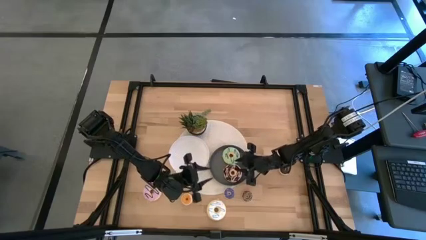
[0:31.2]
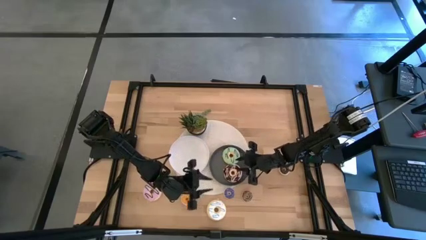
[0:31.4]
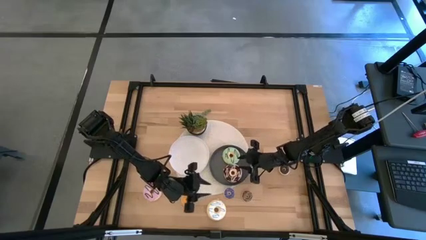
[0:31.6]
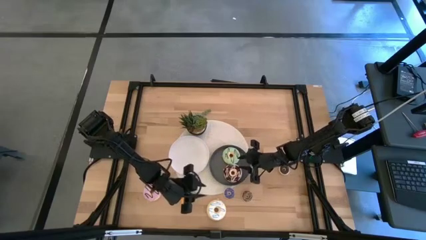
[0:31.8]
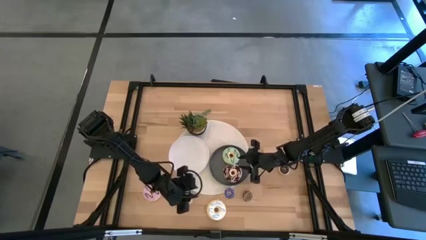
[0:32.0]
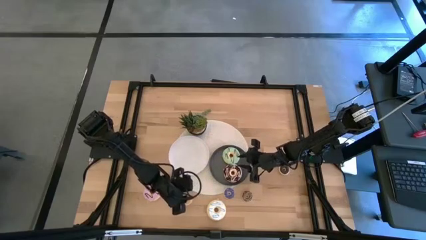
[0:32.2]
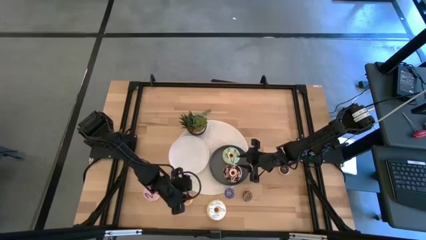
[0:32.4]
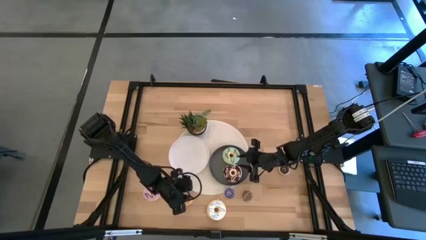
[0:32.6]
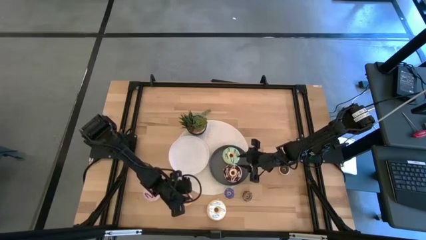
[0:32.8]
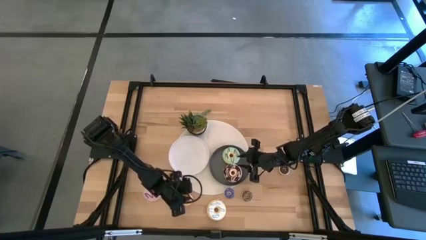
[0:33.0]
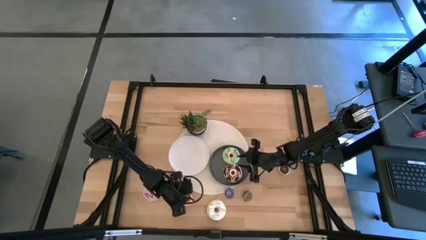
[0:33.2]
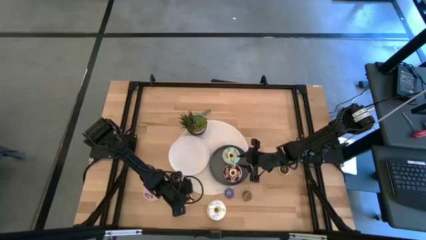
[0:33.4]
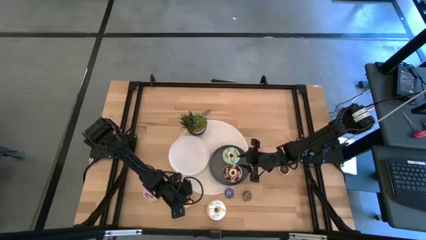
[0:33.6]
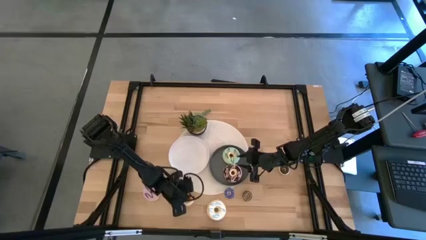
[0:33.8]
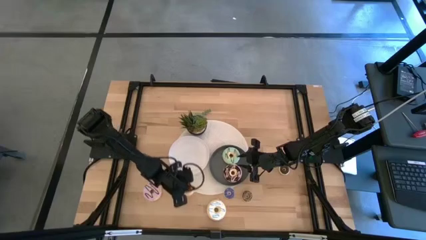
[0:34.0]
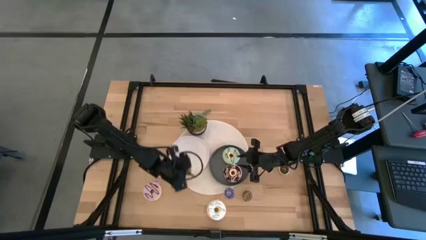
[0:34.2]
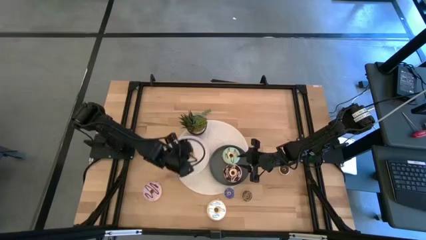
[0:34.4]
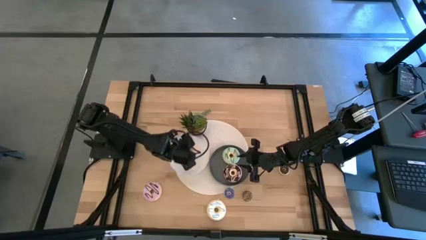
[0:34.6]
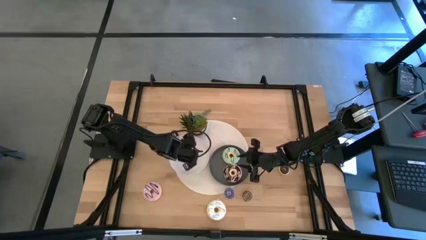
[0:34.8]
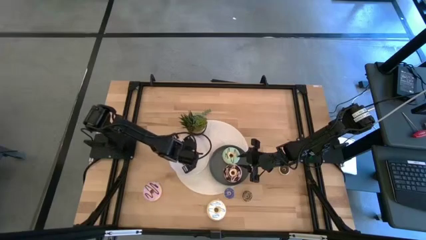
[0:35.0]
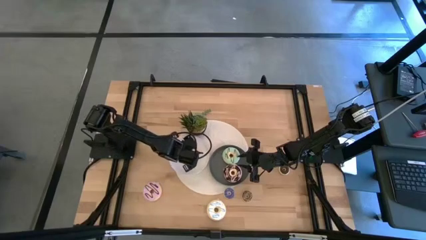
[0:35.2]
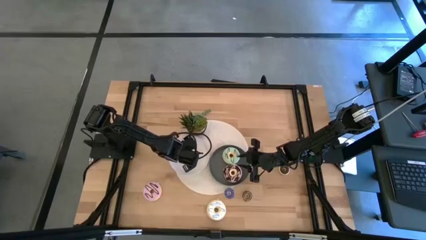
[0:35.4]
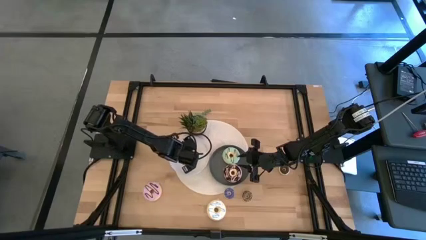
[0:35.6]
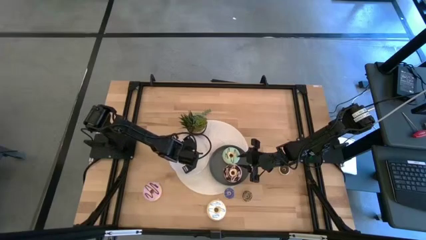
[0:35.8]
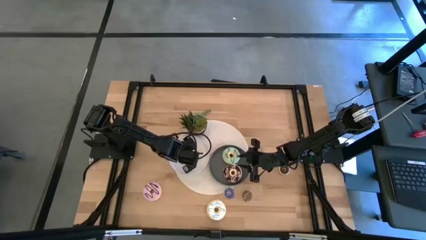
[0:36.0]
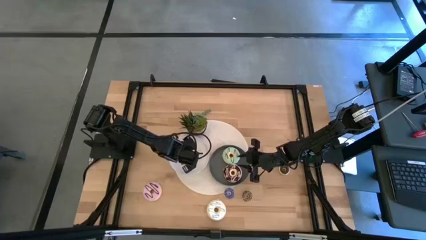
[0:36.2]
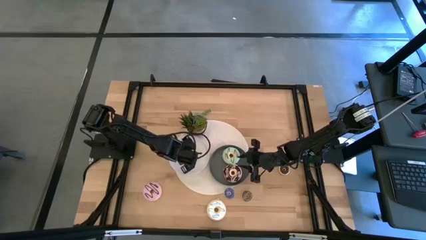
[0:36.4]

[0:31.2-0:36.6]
Task: Pick & Place donuts
Put the small orange donut on the white plate

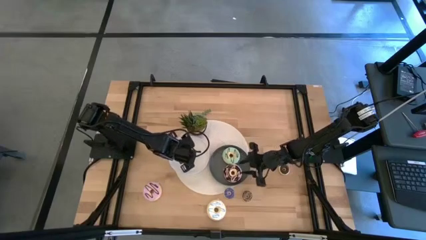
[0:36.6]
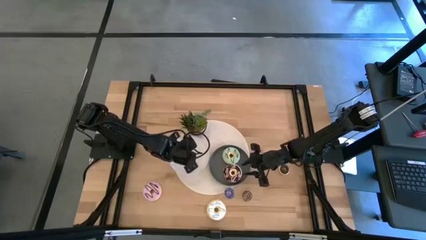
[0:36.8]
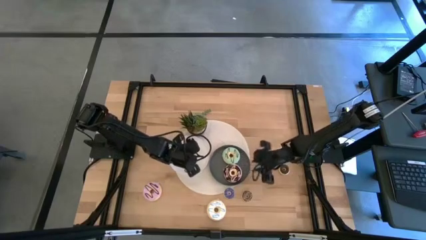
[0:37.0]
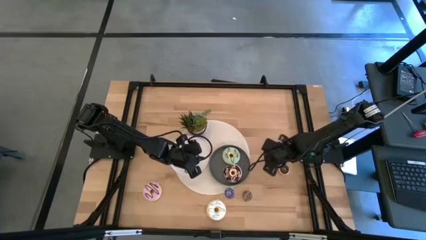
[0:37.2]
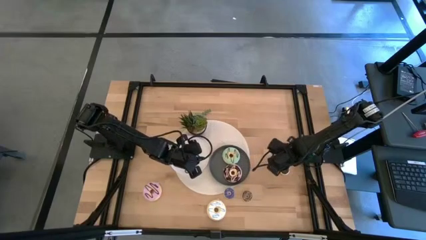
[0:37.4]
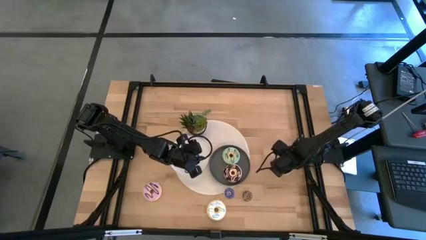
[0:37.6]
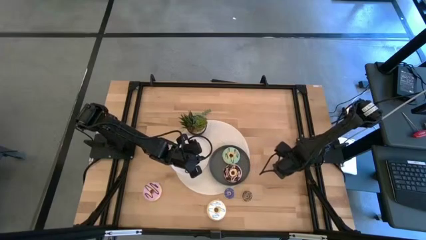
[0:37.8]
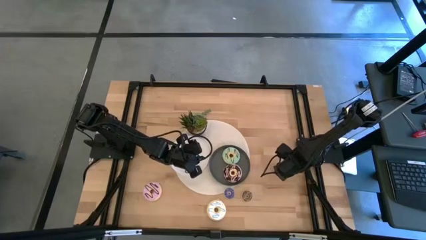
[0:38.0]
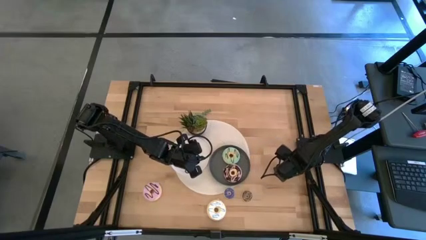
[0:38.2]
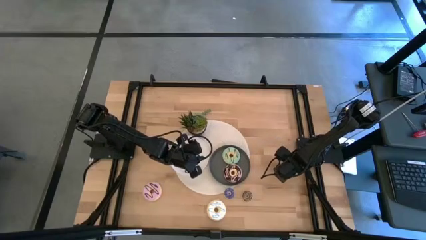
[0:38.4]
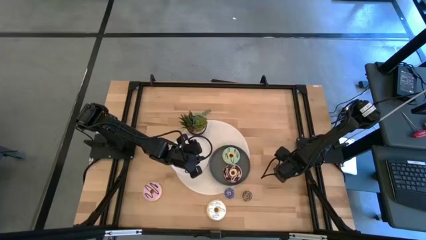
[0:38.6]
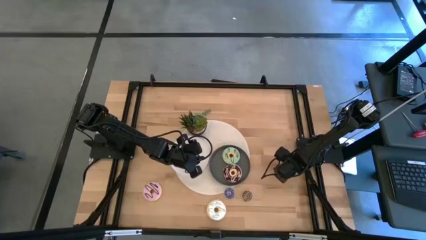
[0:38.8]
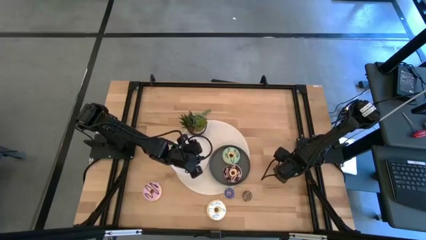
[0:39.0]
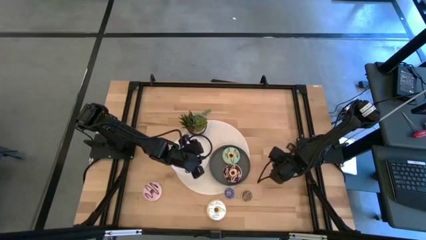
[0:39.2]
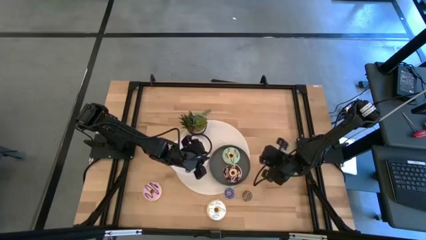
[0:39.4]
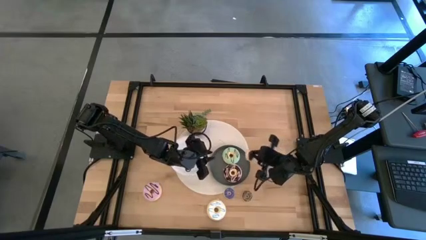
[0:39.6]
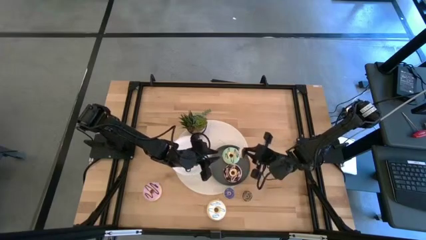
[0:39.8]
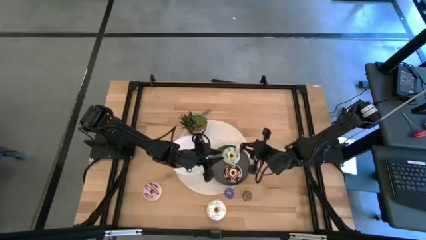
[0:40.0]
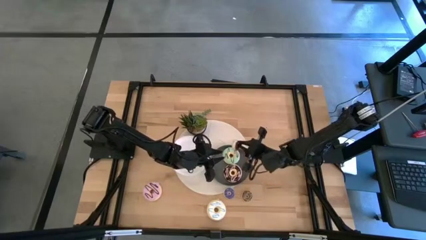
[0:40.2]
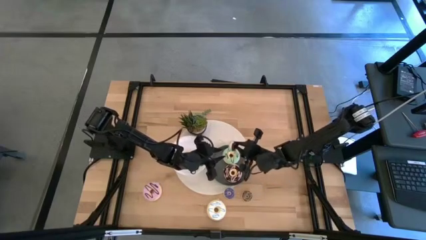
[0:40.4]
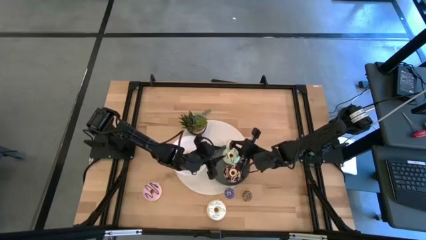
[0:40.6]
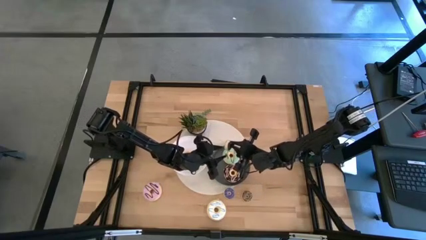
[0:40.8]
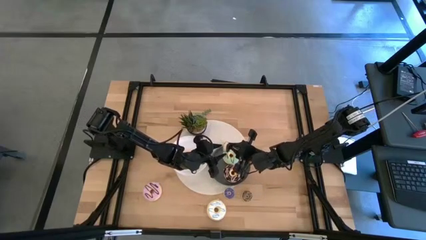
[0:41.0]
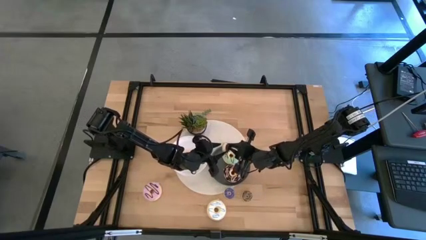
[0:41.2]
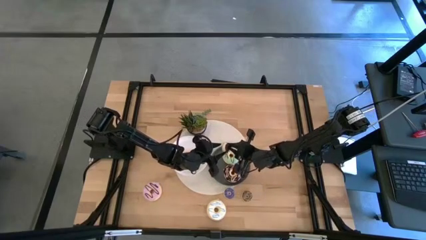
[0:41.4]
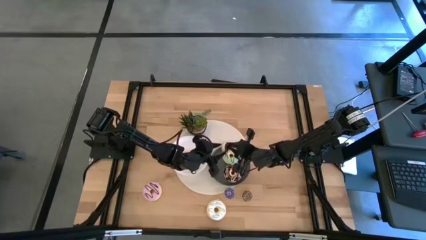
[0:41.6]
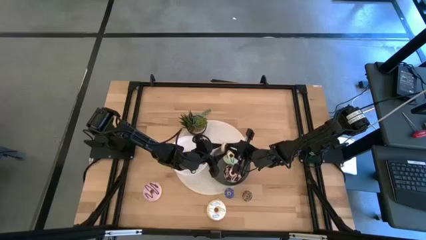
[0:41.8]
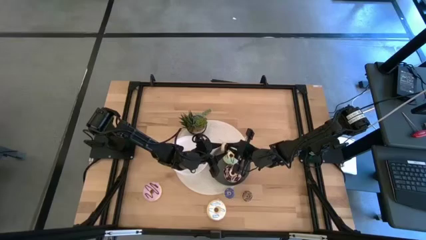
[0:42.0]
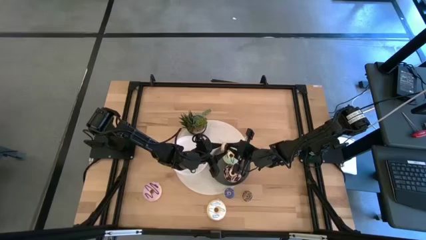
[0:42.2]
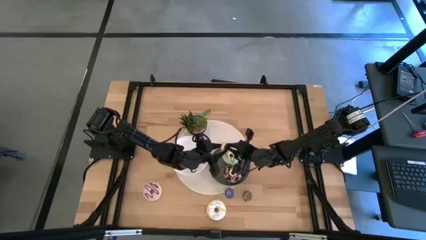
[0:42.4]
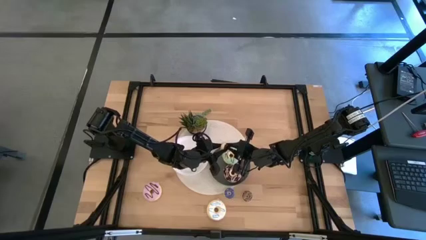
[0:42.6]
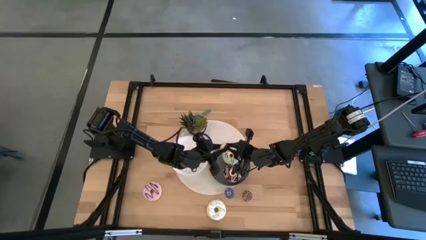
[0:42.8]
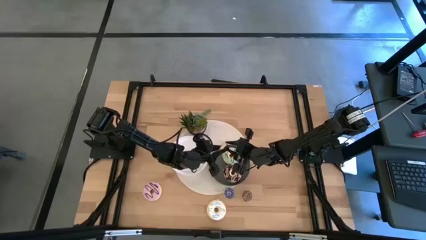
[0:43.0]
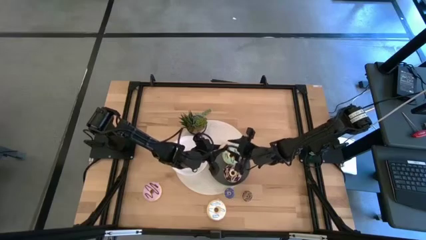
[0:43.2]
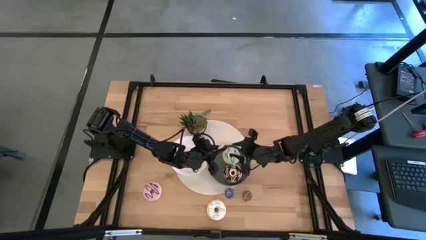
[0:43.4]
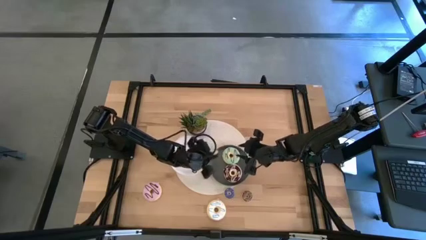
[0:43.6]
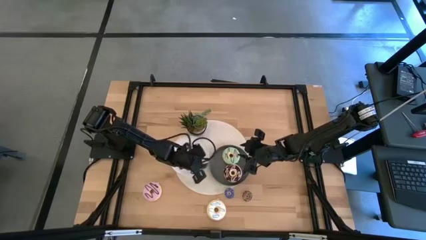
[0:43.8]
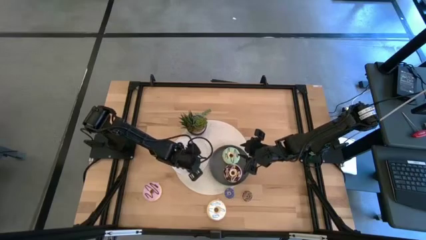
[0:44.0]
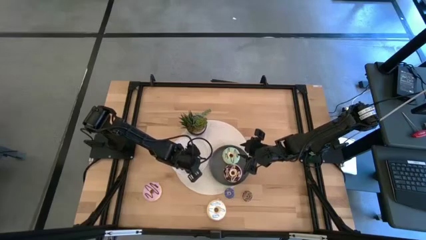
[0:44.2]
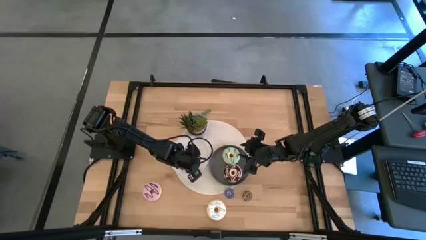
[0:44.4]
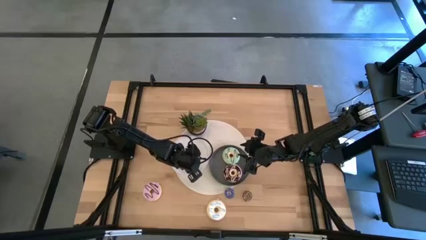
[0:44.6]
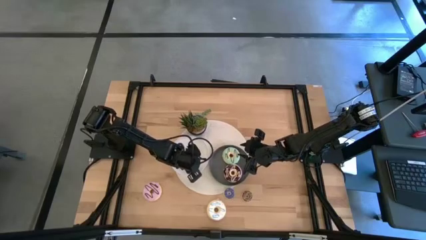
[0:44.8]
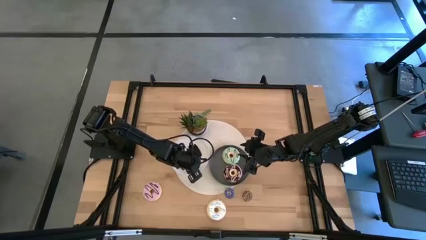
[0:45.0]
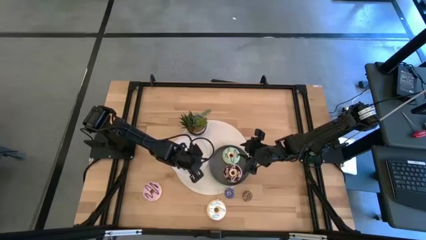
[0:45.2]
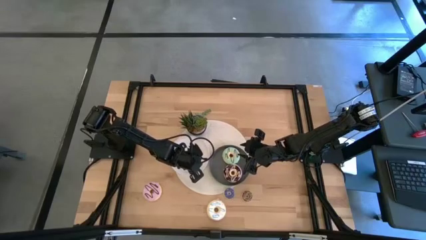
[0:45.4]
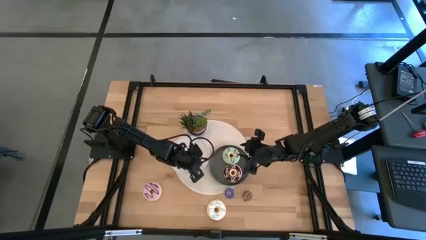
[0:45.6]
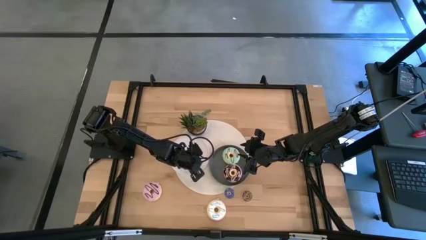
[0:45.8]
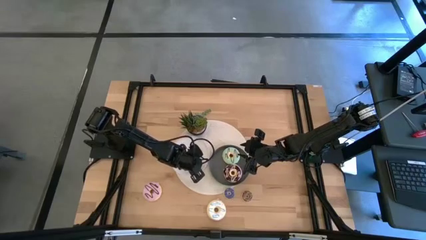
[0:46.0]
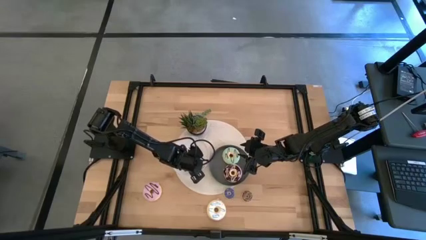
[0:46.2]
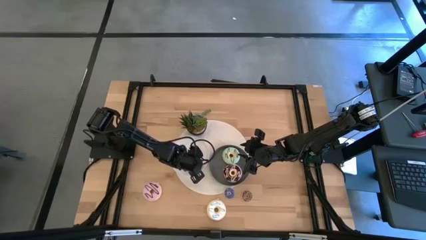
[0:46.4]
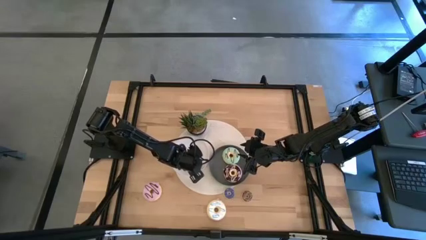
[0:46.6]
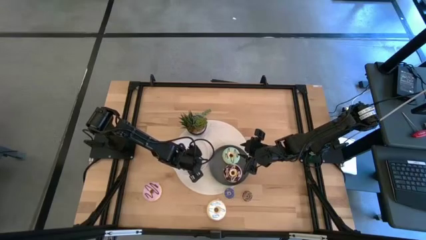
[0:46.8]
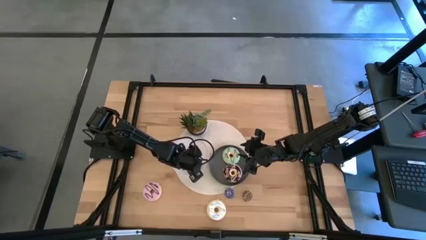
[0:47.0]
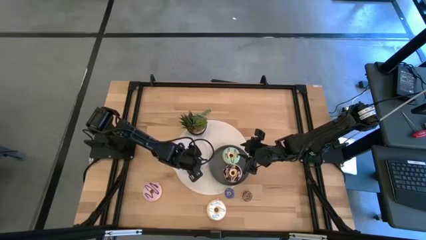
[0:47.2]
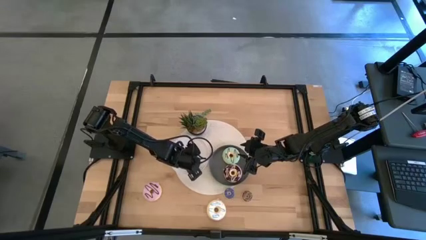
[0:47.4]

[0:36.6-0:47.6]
Put the small black donut on the white plate
